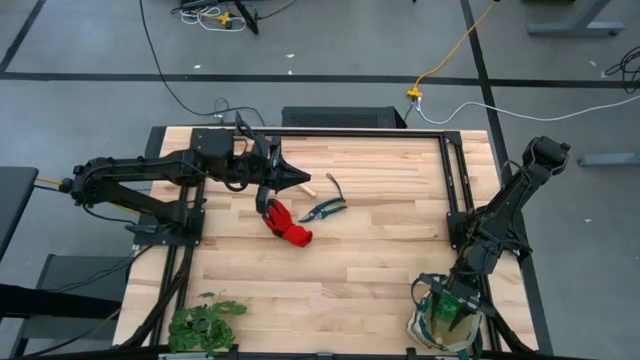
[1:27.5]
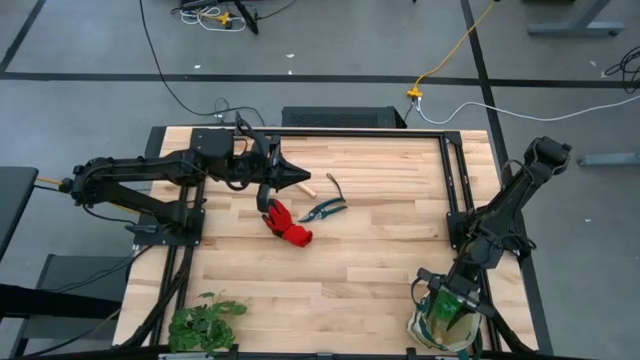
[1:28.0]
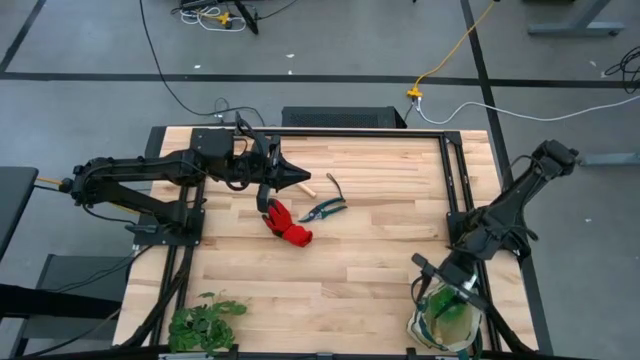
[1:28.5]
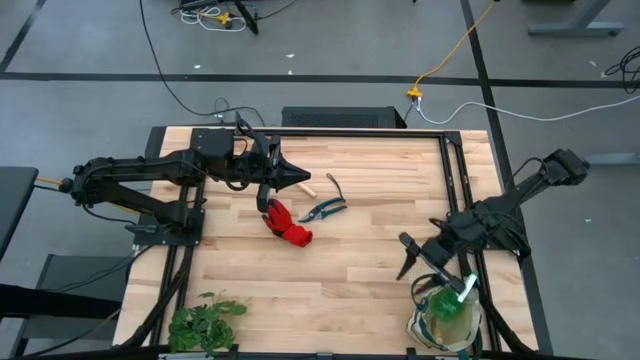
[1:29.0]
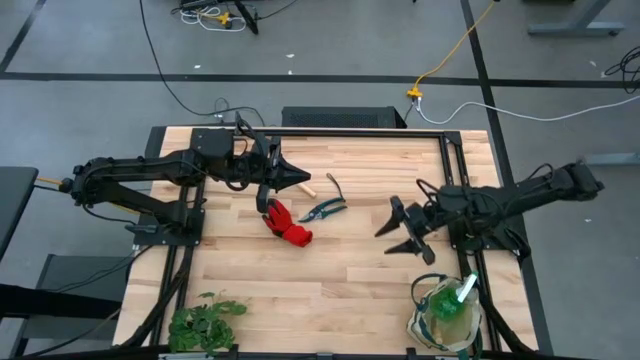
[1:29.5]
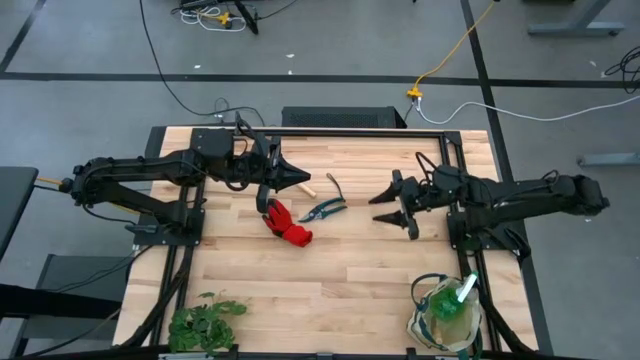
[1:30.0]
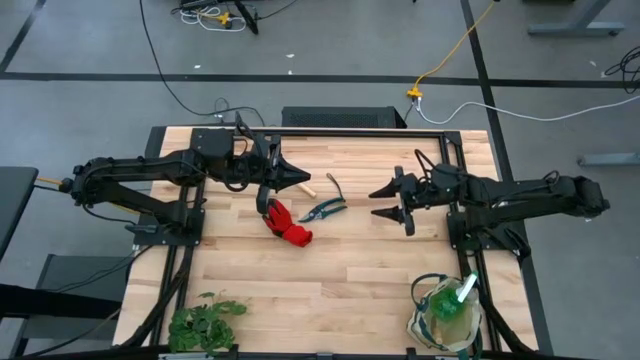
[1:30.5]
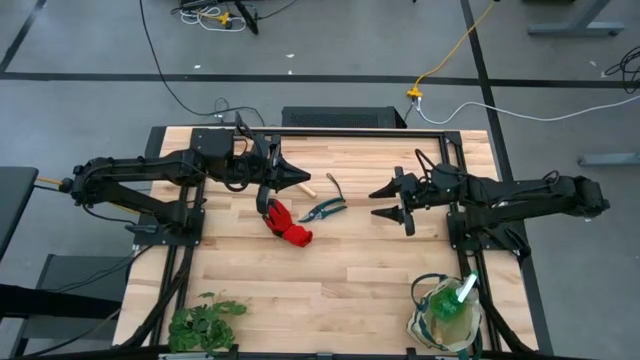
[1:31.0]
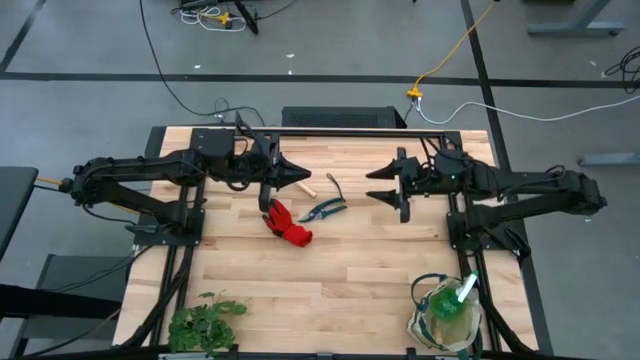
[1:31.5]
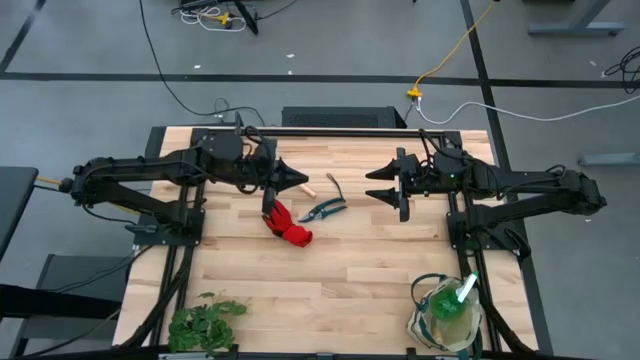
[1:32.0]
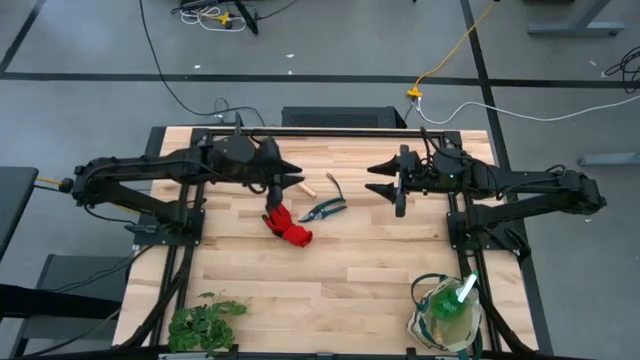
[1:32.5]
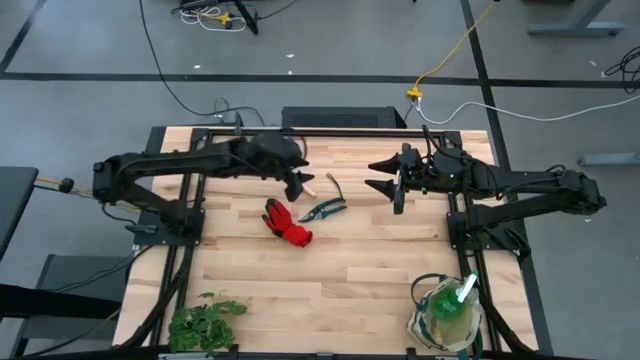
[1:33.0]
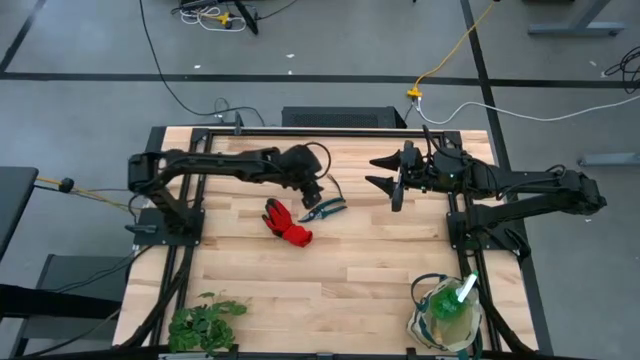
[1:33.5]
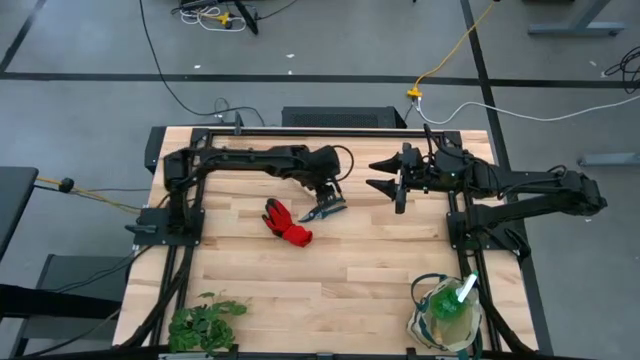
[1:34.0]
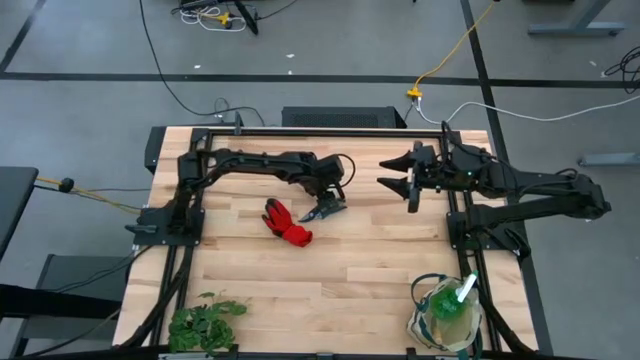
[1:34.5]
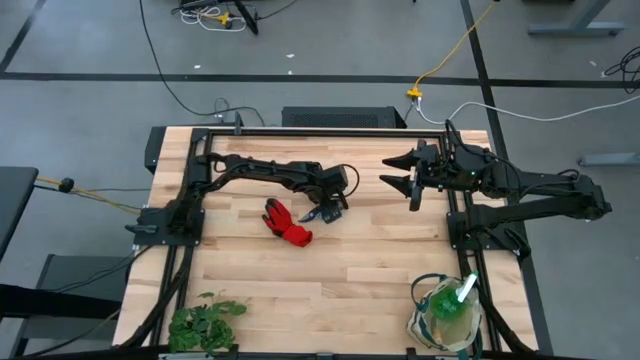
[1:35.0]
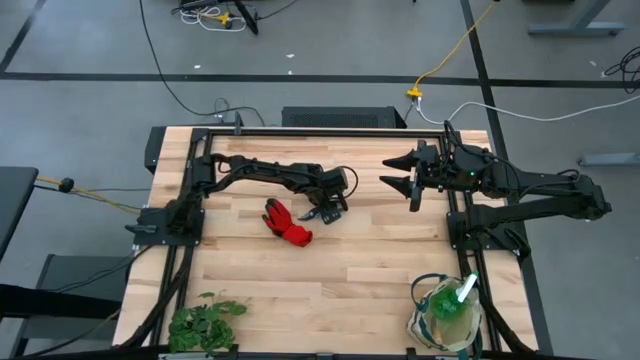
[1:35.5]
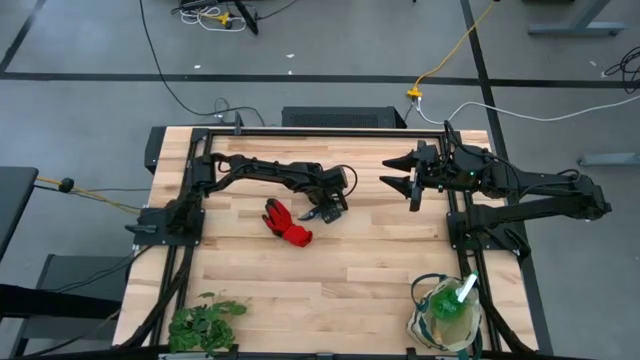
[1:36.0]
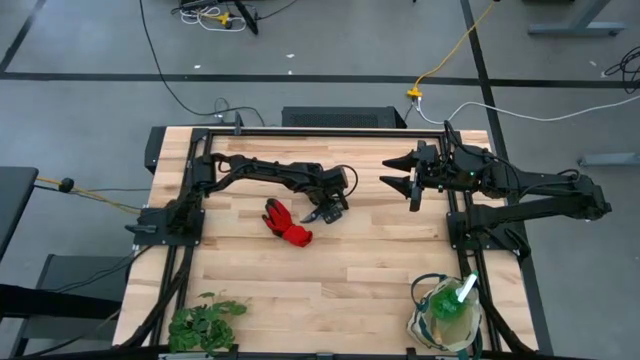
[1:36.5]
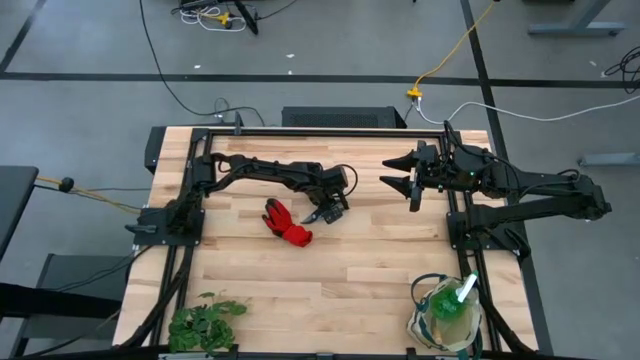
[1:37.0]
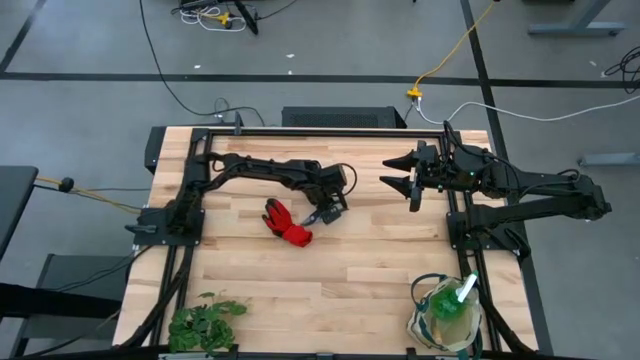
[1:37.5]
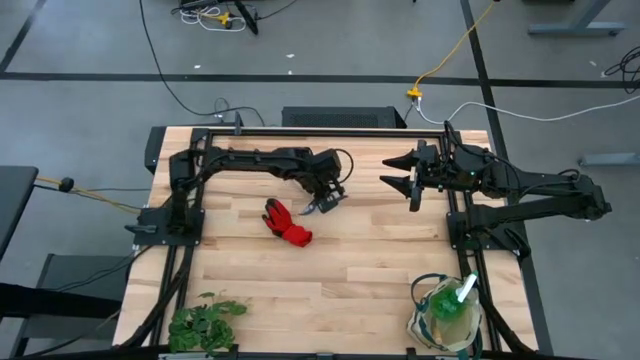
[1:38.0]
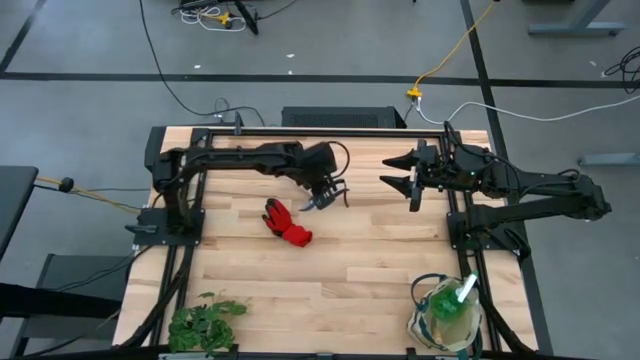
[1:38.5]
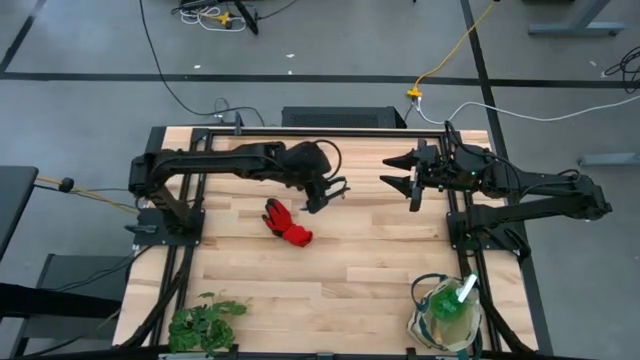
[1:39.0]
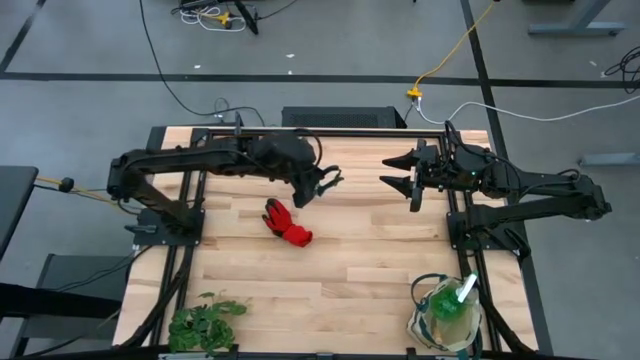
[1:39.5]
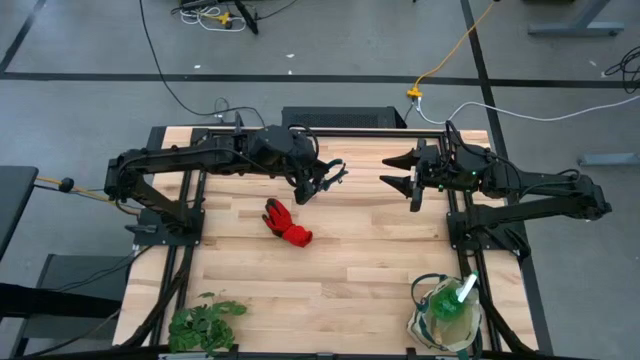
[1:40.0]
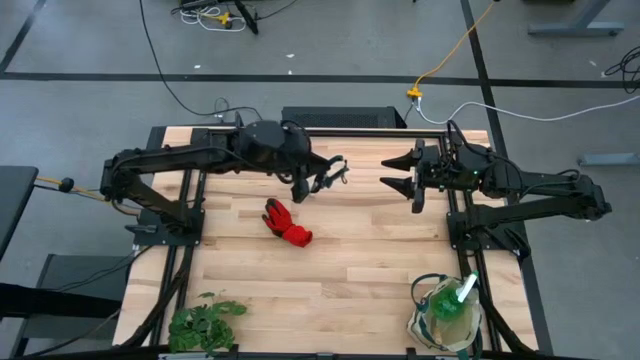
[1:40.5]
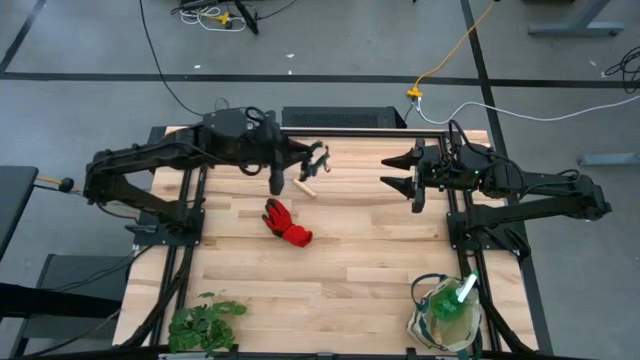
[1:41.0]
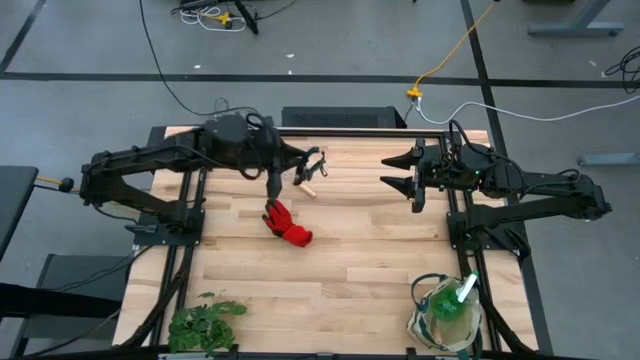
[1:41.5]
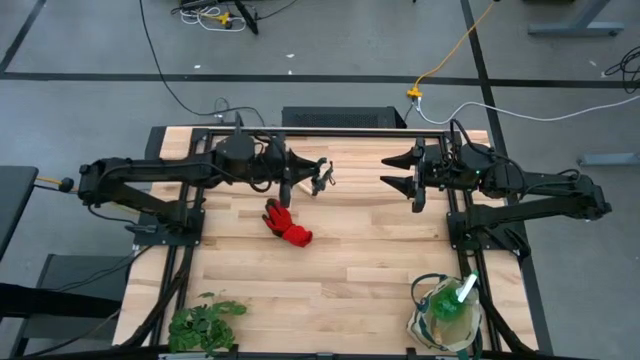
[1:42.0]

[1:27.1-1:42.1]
Task: Pick & Place Garden tools in Gardening bag
Put the shear scissors into the gardening bag

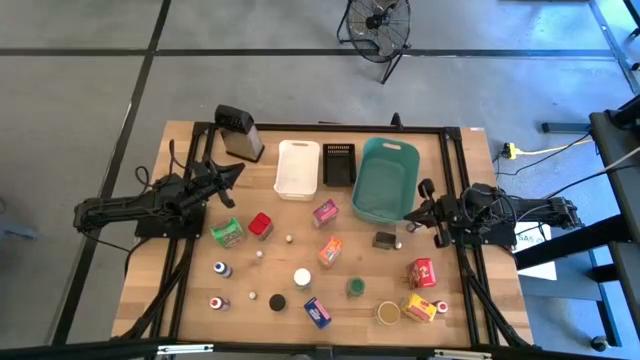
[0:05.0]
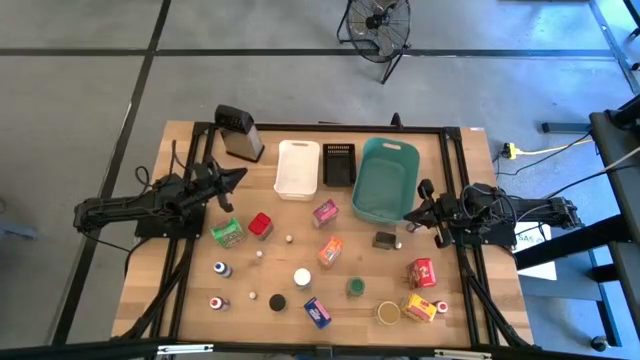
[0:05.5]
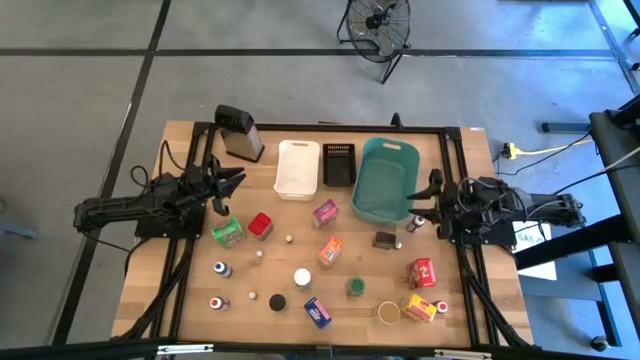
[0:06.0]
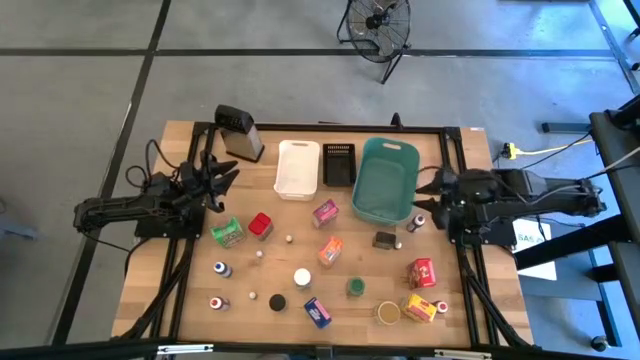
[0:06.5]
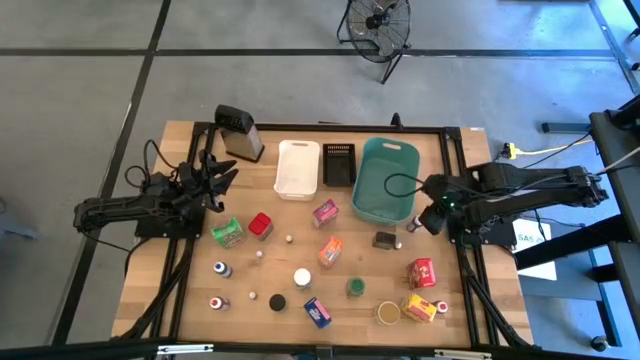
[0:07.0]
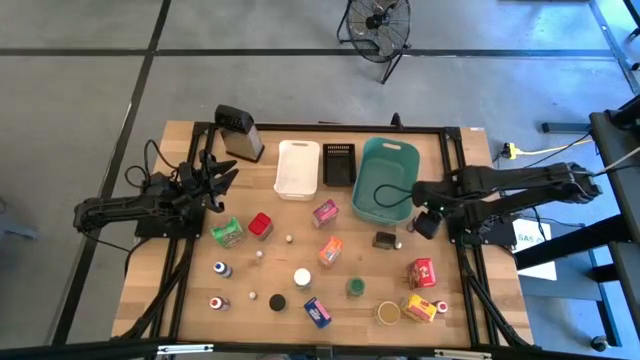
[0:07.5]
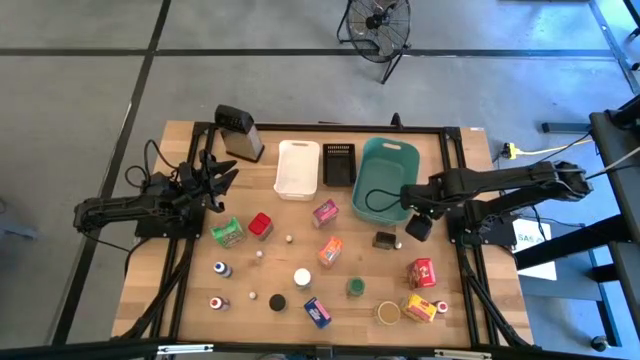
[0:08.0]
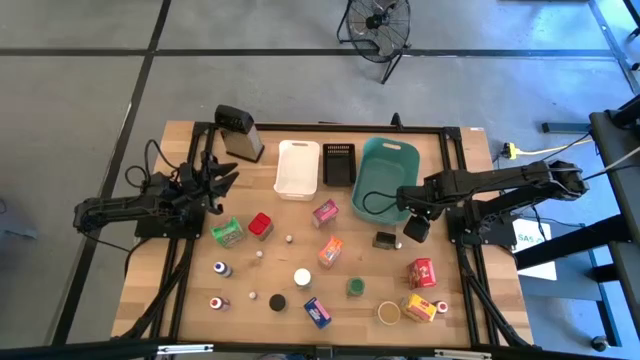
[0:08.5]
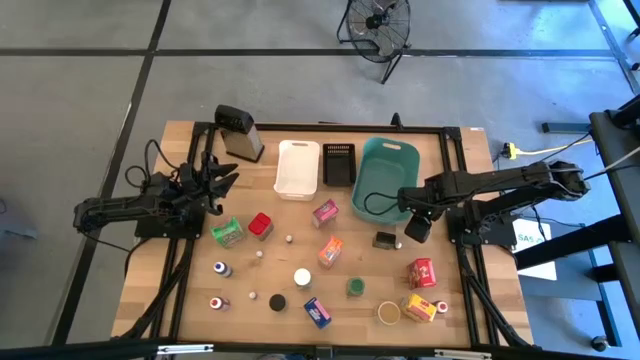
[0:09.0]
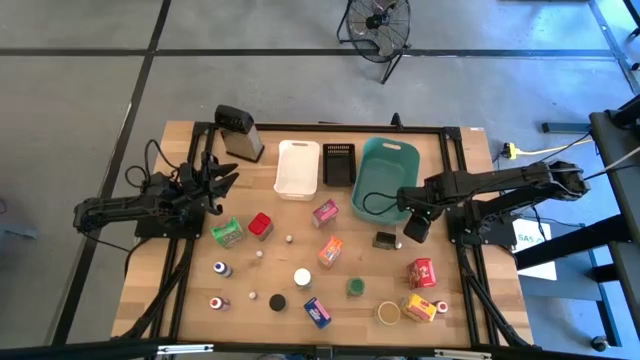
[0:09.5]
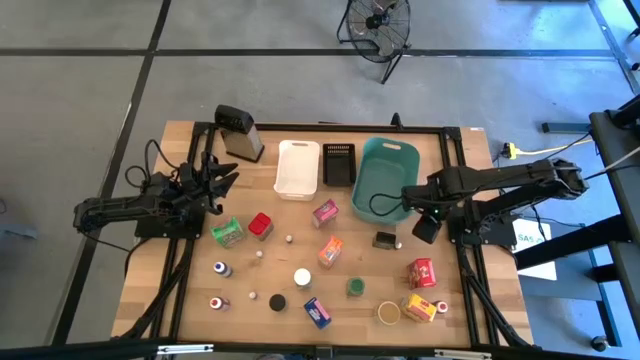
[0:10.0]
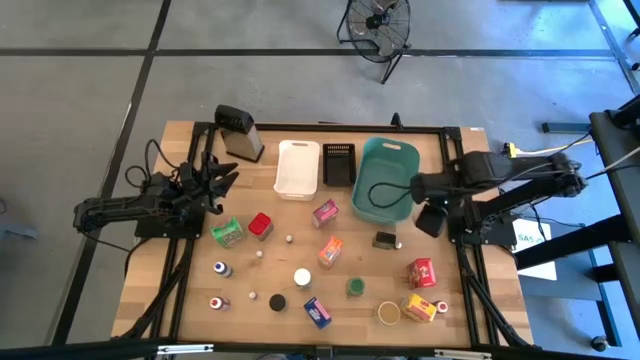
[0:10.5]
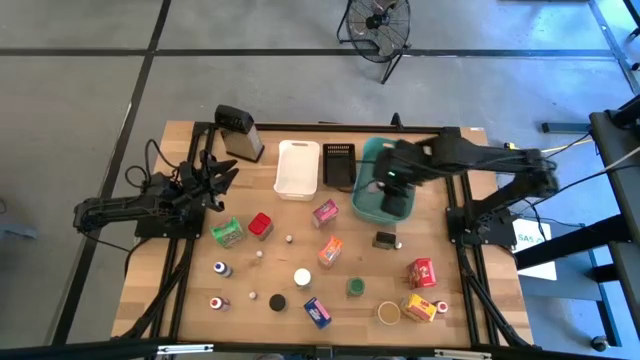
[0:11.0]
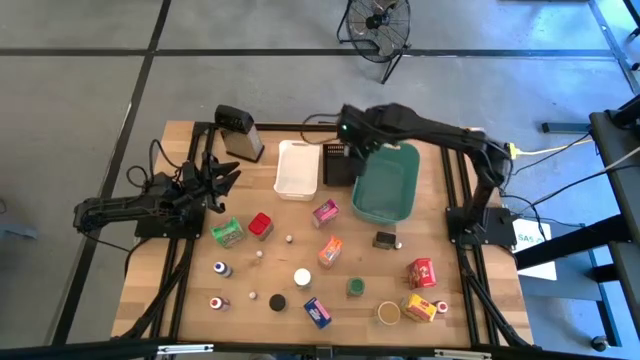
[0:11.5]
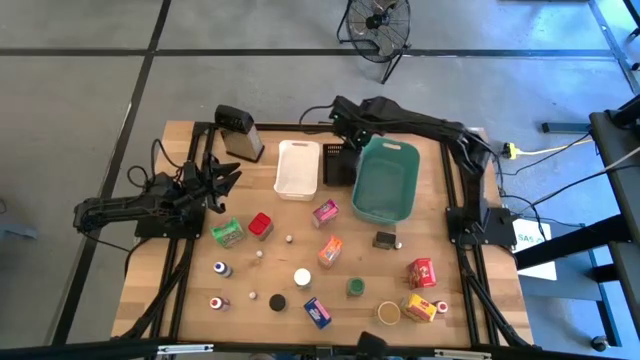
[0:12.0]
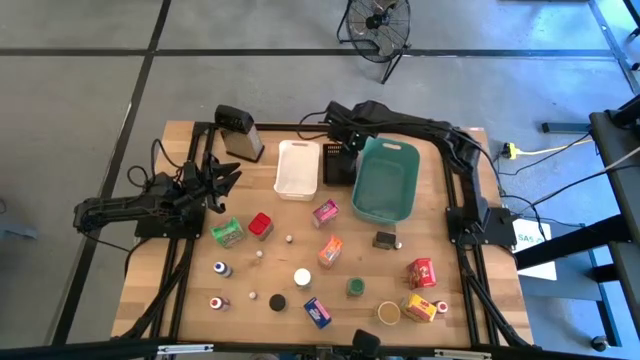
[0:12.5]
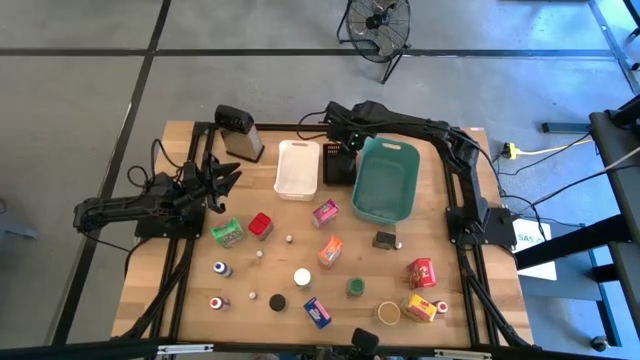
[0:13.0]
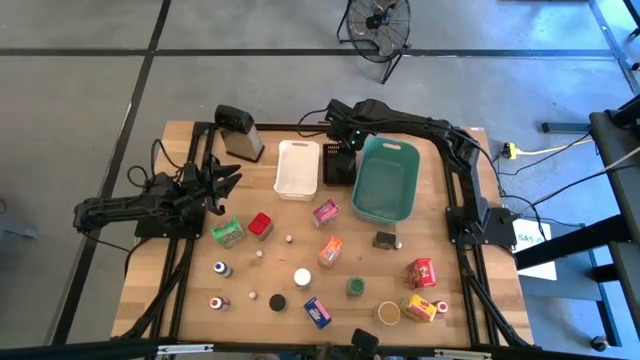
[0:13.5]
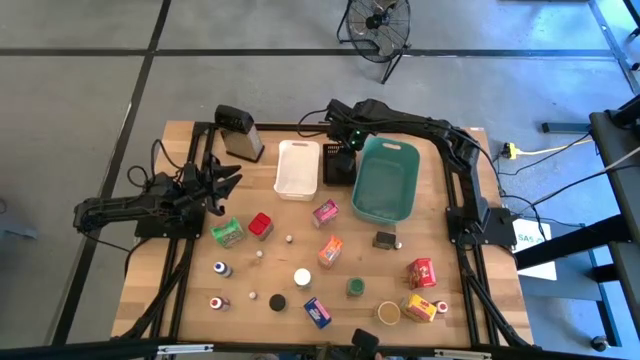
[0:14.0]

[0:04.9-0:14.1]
Task: Pick & Place Kitchen Items
Put the large purple food coloring bottle into the black bin
